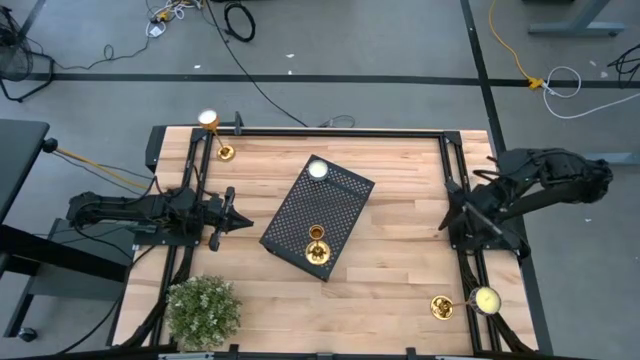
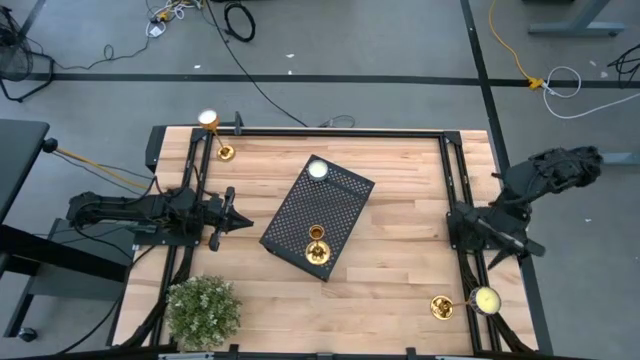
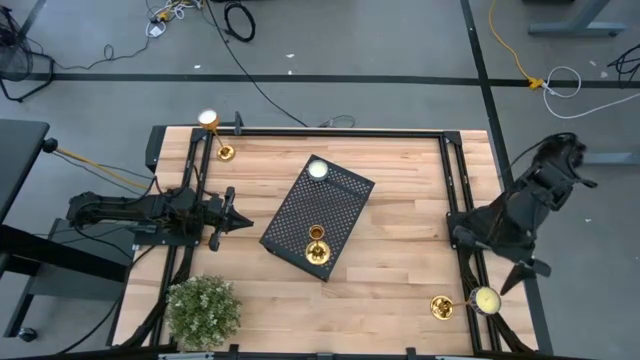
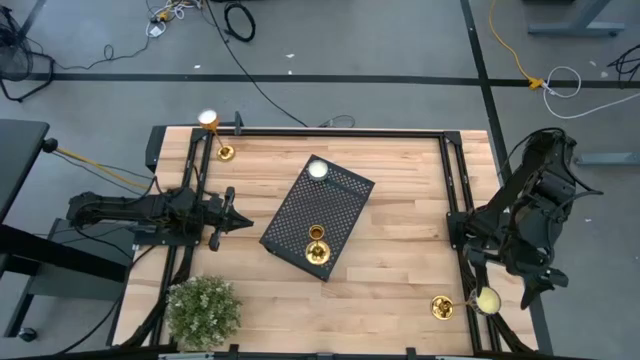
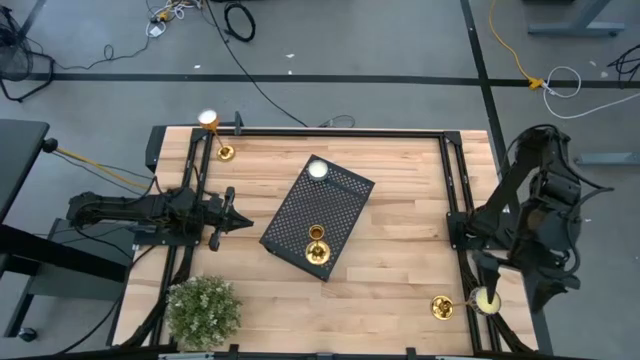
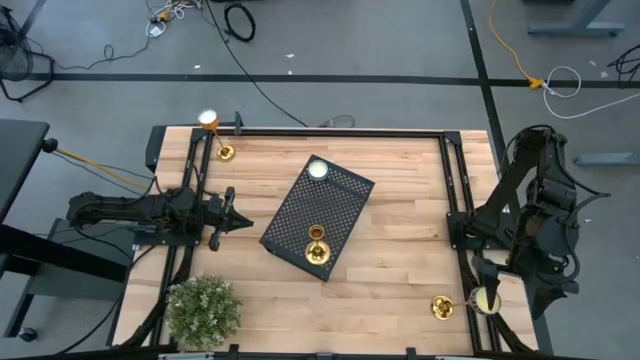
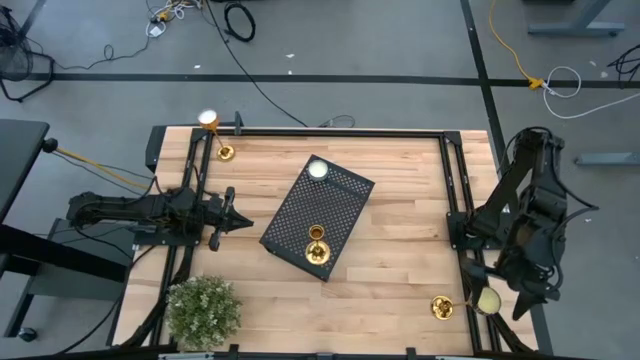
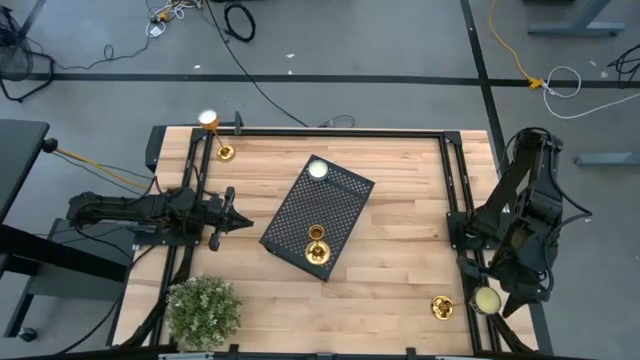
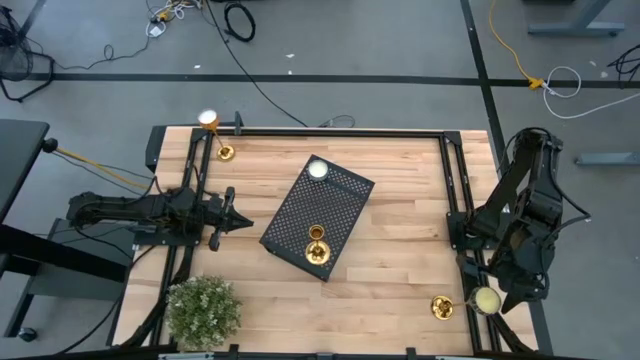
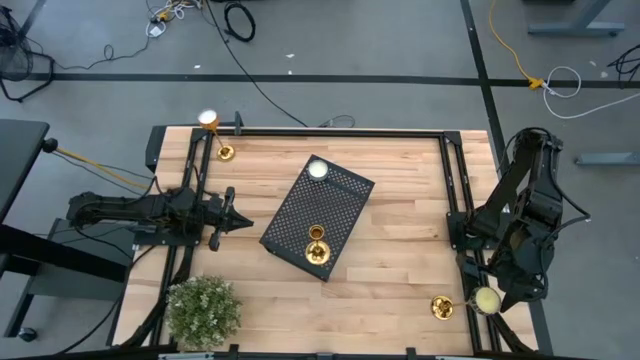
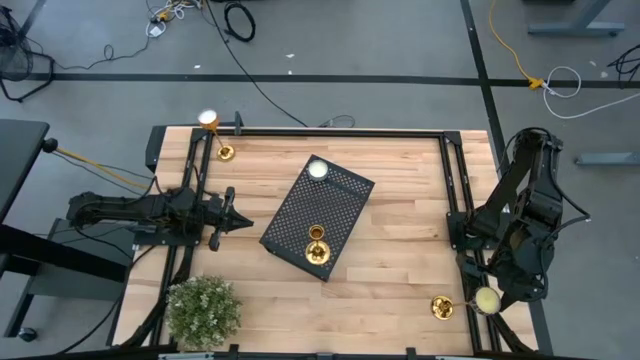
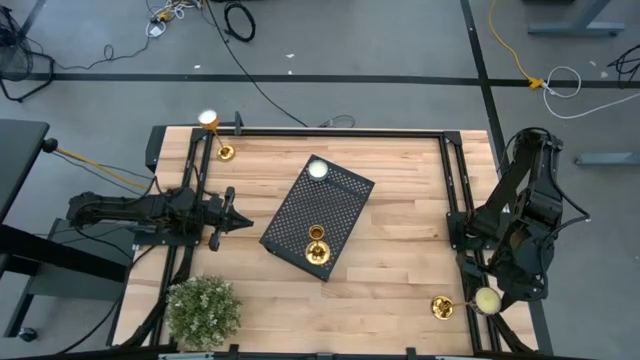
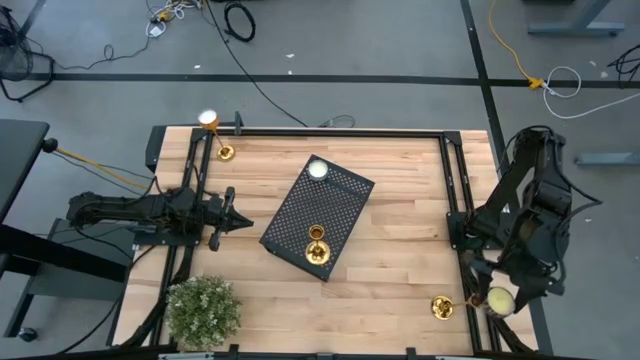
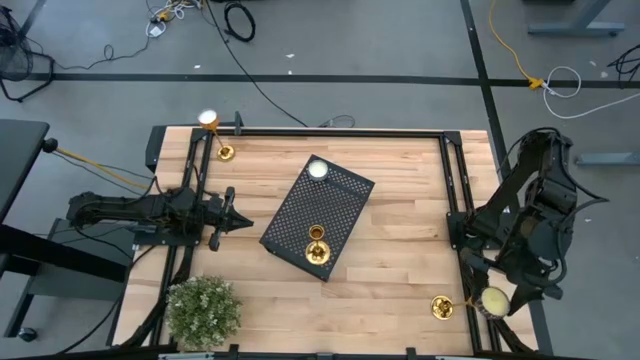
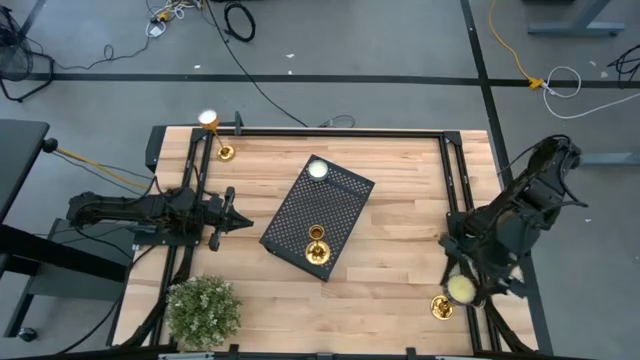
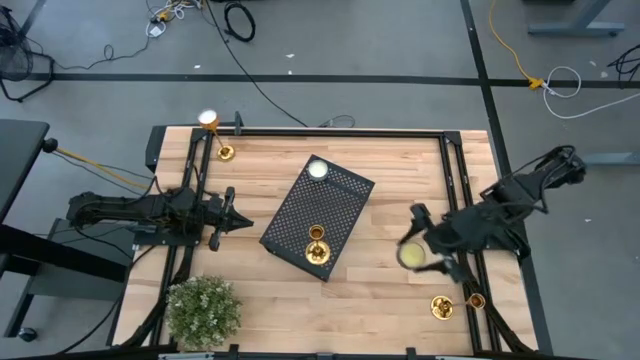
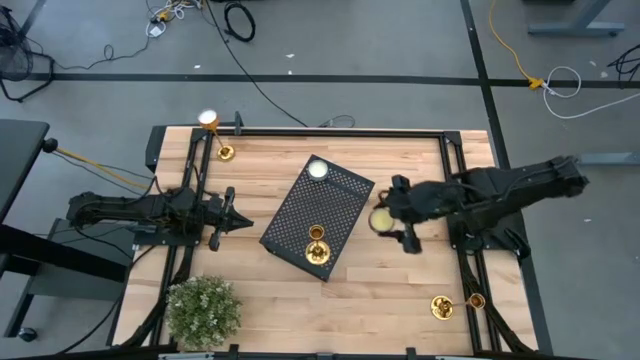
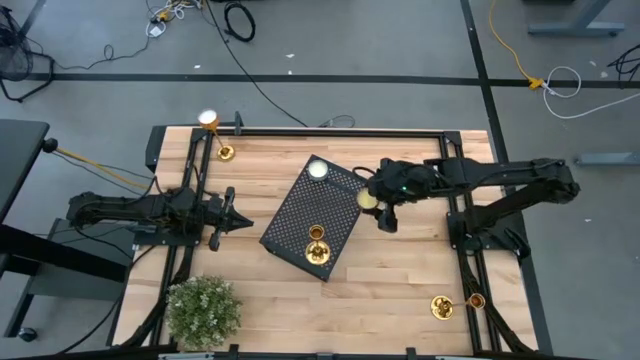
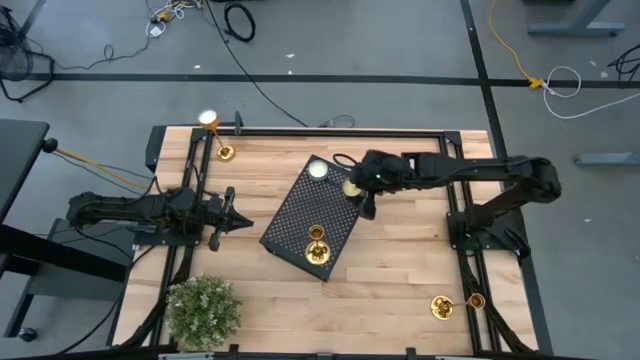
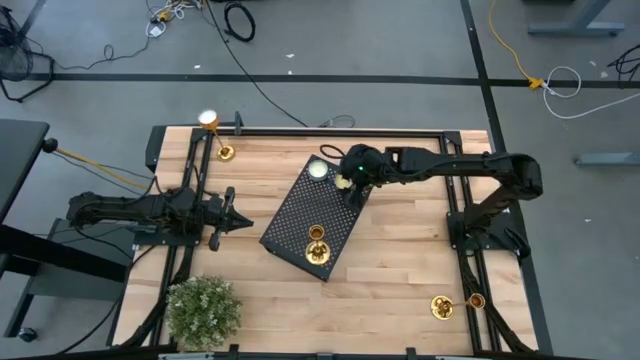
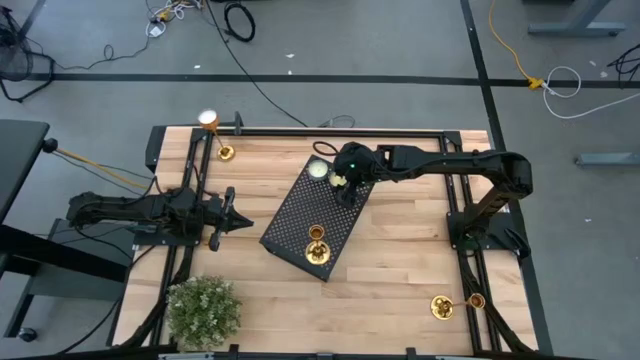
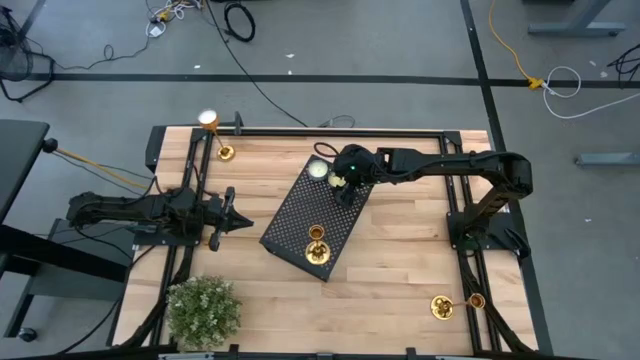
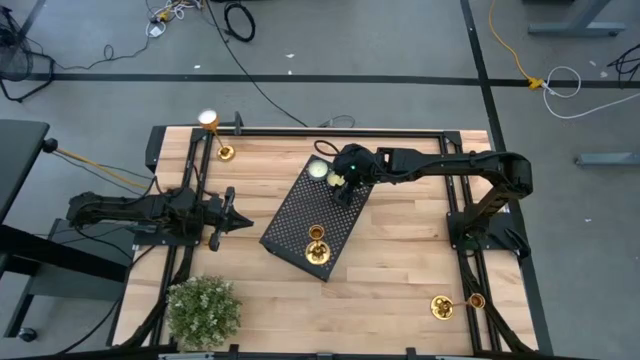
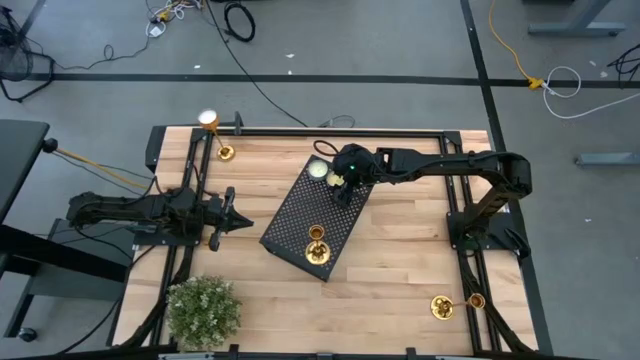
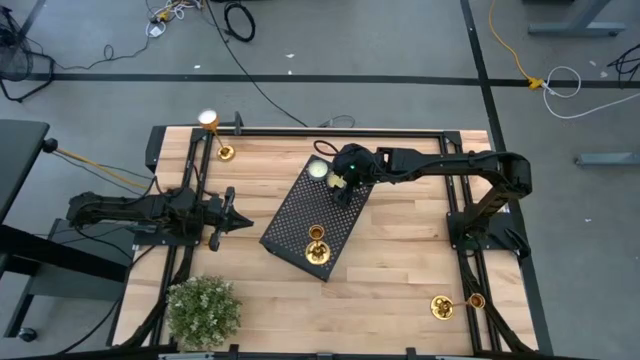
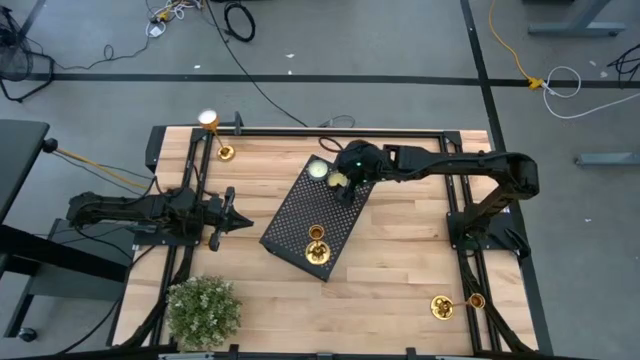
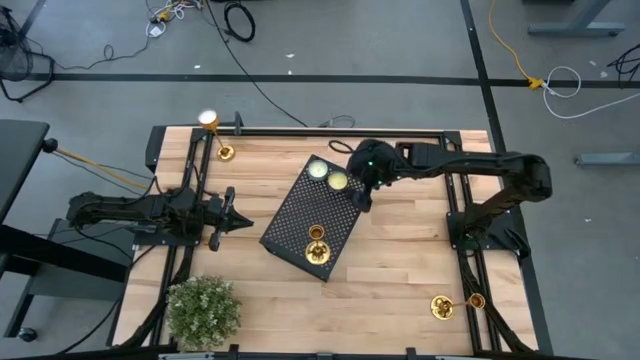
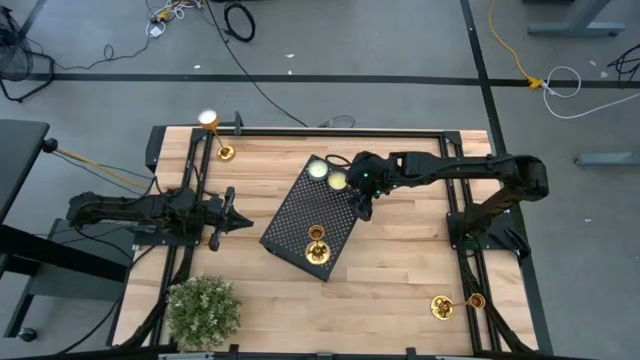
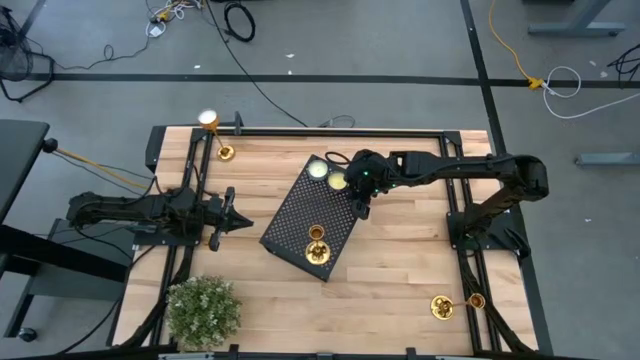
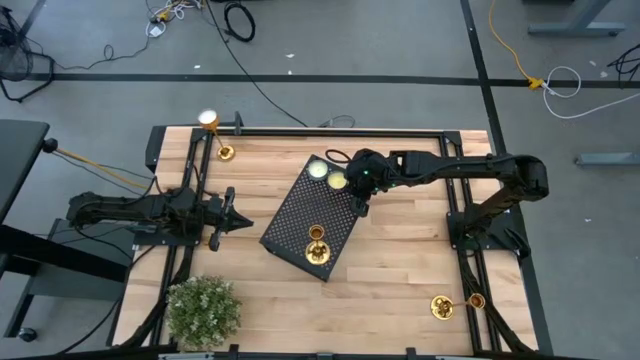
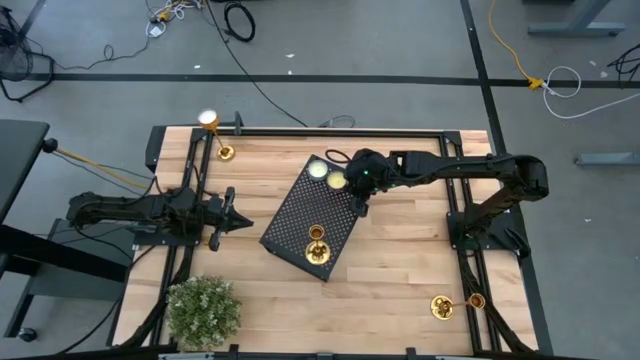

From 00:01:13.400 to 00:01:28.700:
Task: Stock candles on shelf
Put the red scented candle on the shelf

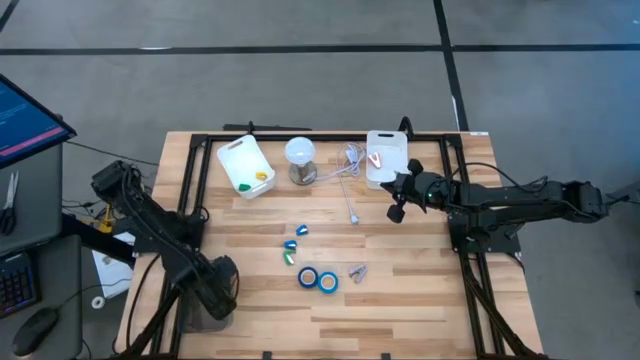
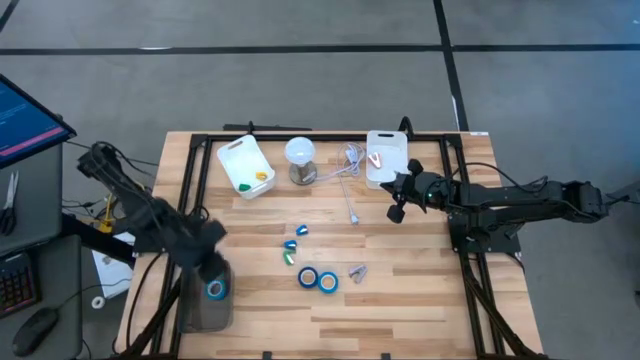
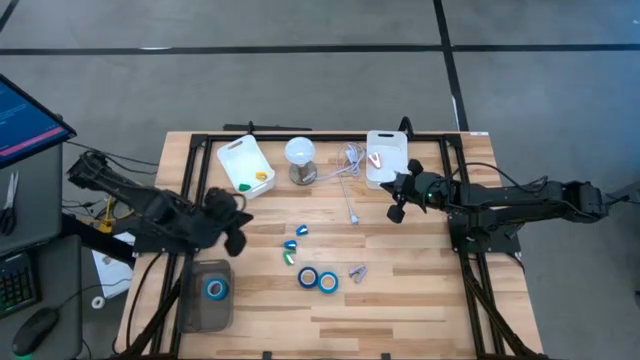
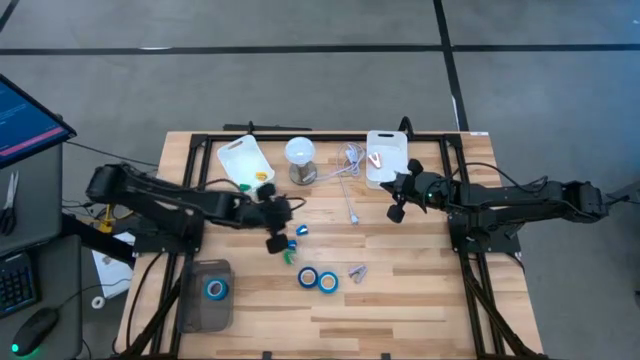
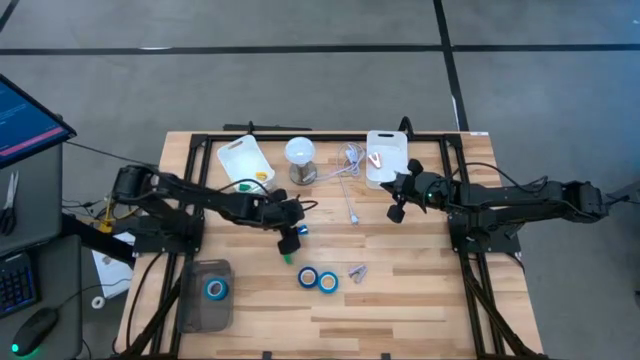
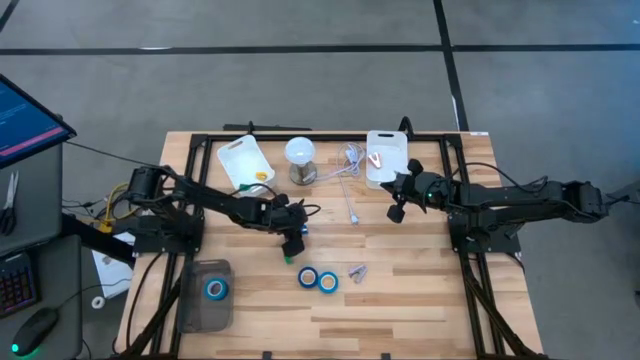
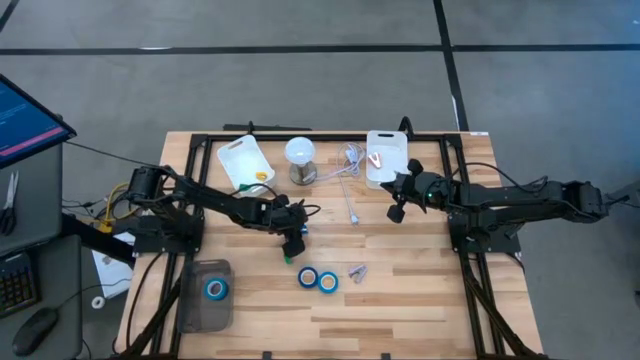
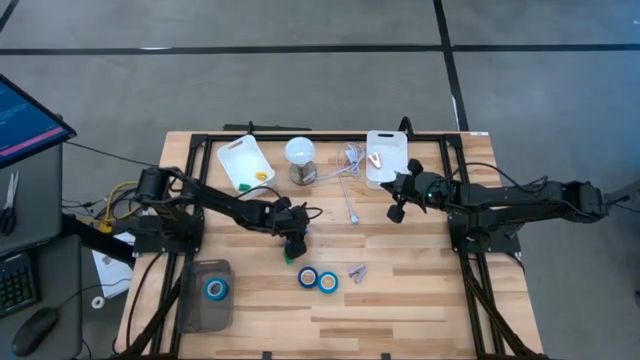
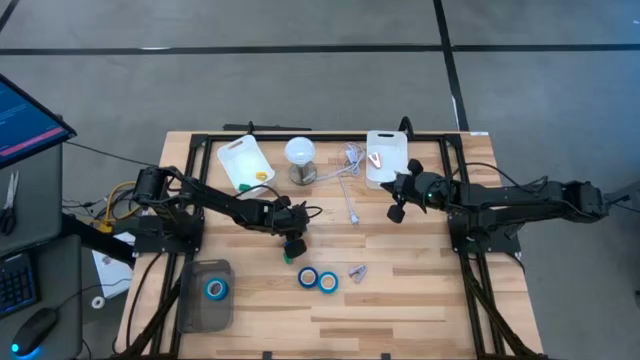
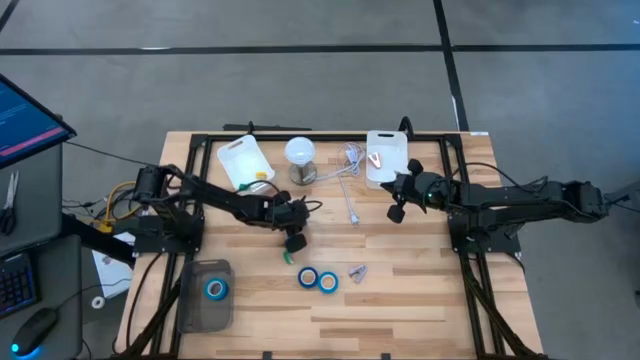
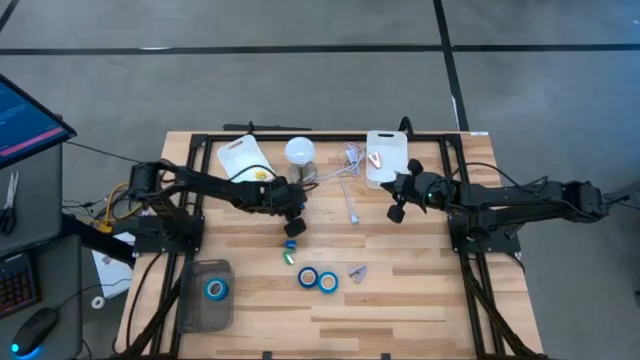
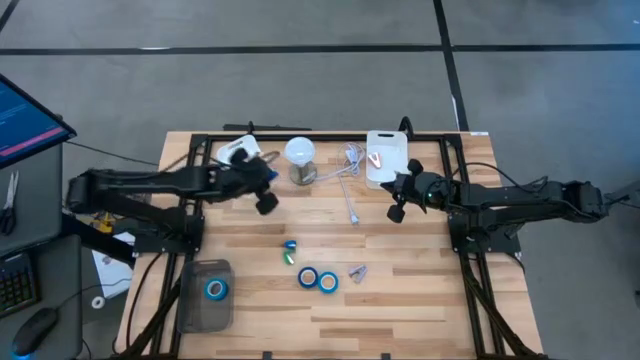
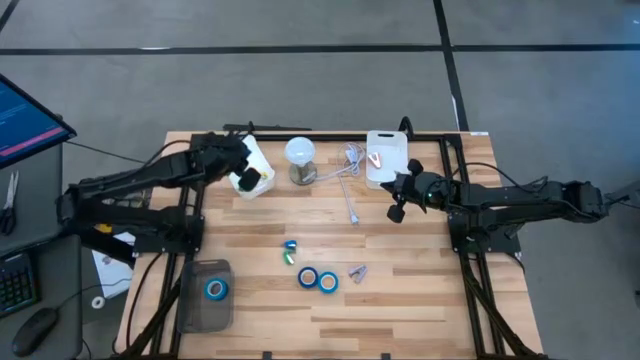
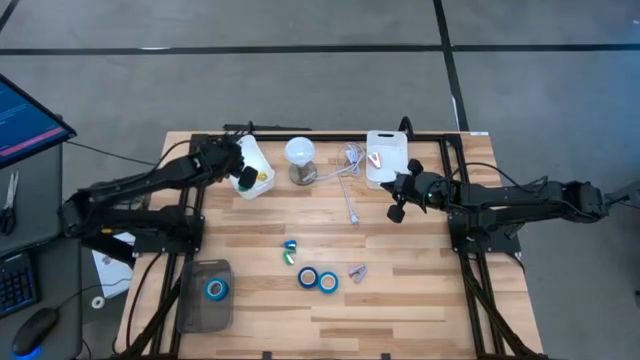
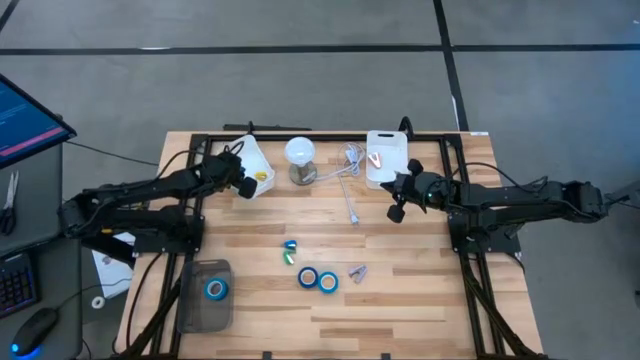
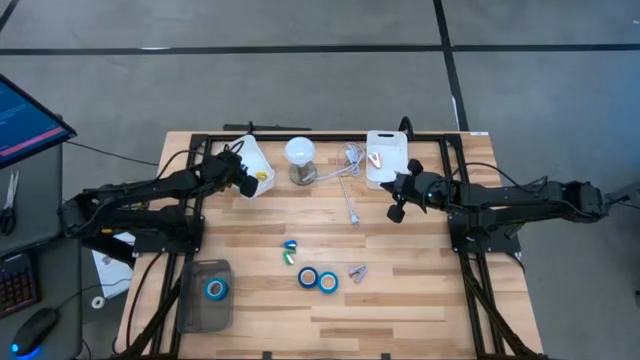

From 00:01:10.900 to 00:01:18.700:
Task: Pick and place Stapler, Stapler remover, tape
Put the top blue stapler into the left white bin
